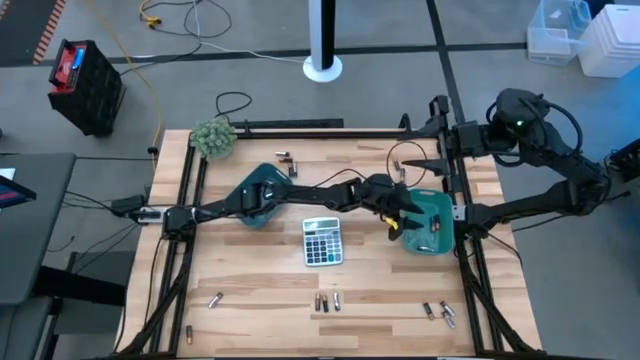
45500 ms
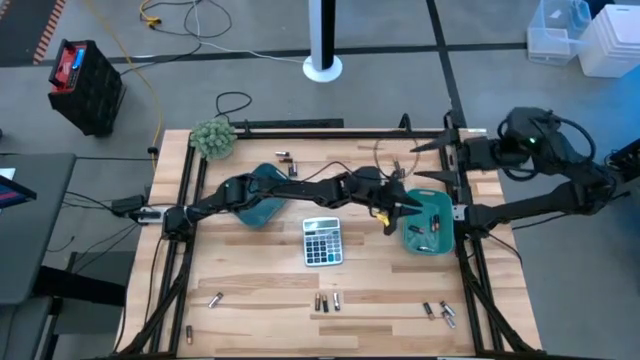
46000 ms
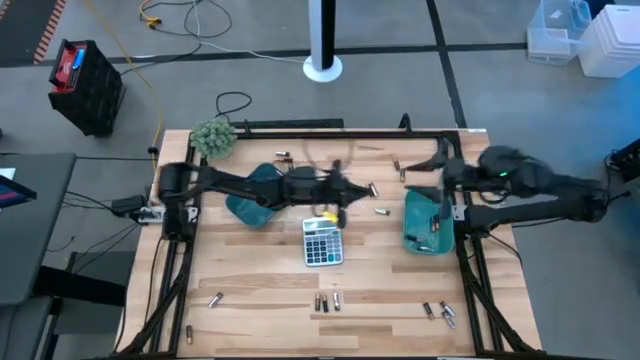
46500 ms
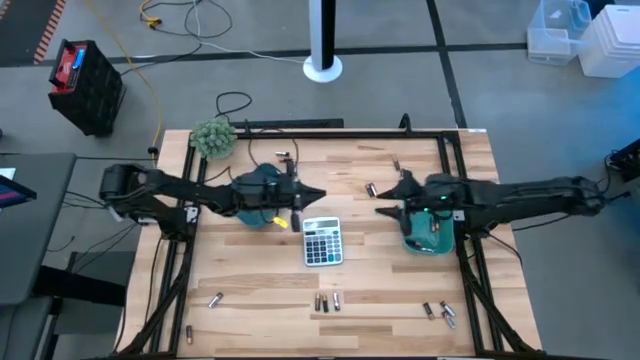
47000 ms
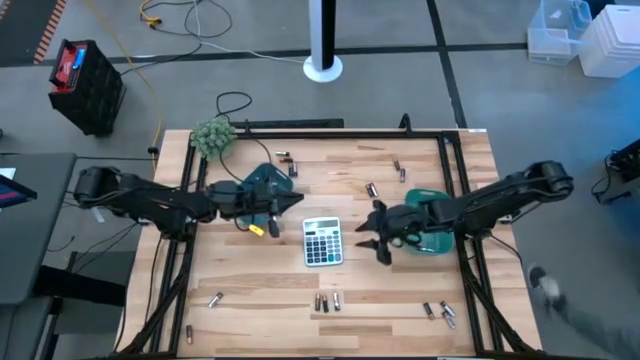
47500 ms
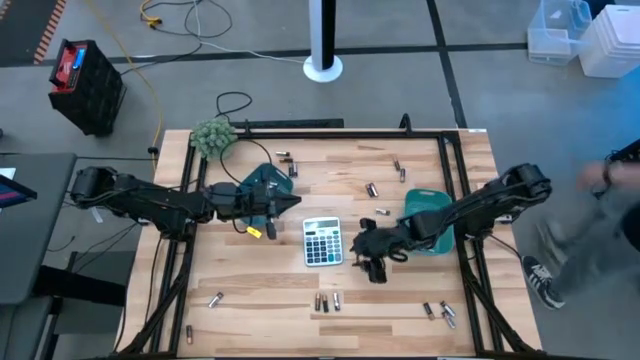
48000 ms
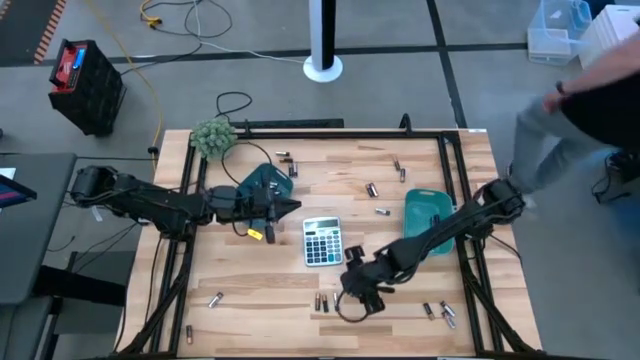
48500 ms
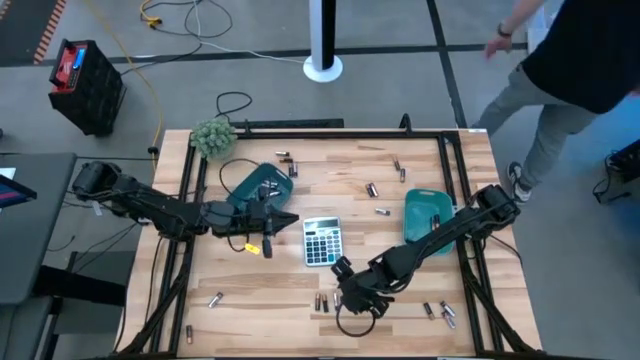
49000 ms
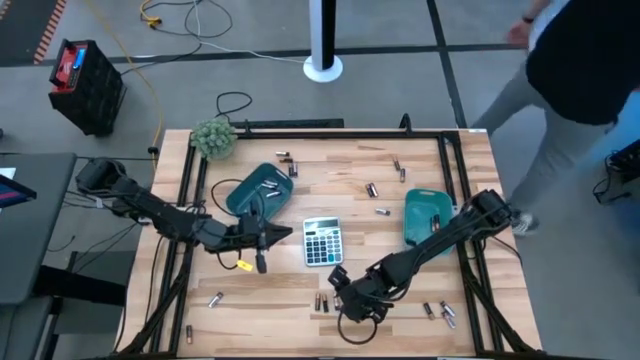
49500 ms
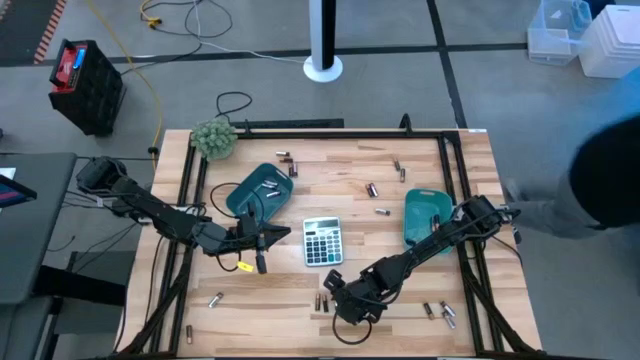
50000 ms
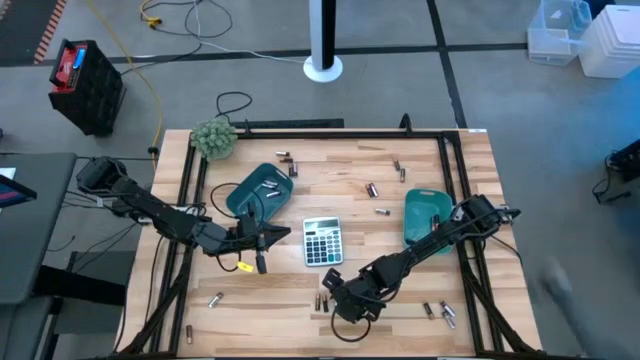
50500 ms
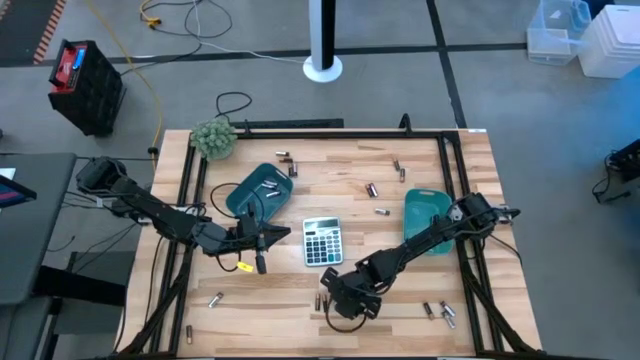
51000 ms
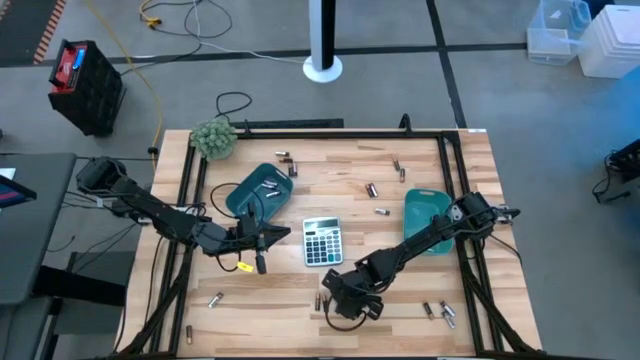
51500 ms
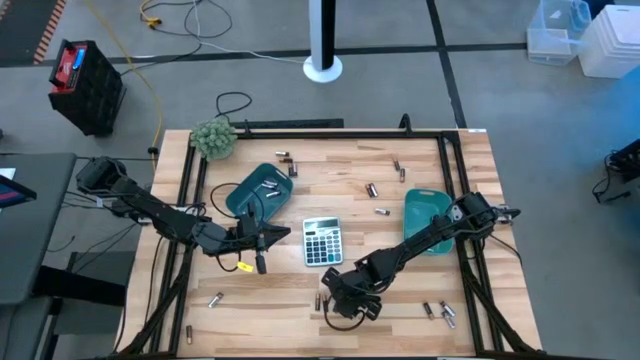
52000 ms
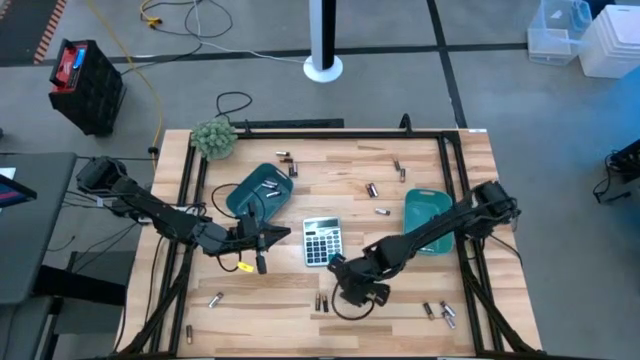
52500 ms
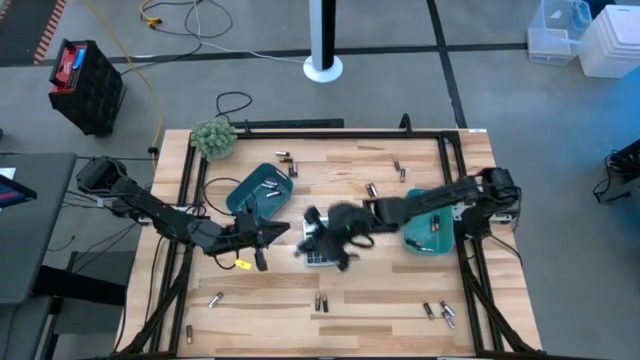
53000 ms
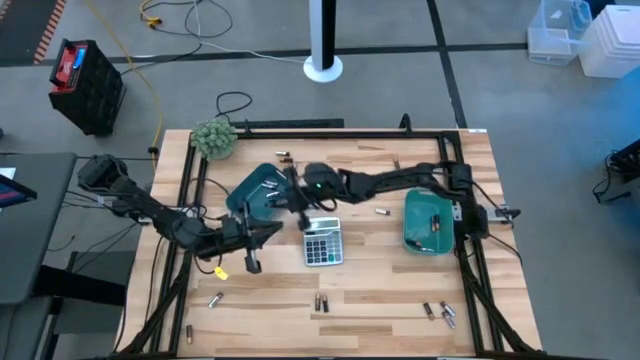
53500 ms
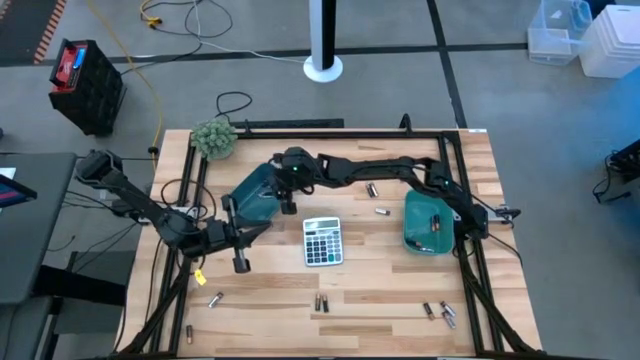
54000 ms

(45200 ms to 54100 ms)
Task: Sort batteries
Put the silver/black battery into the blue bin

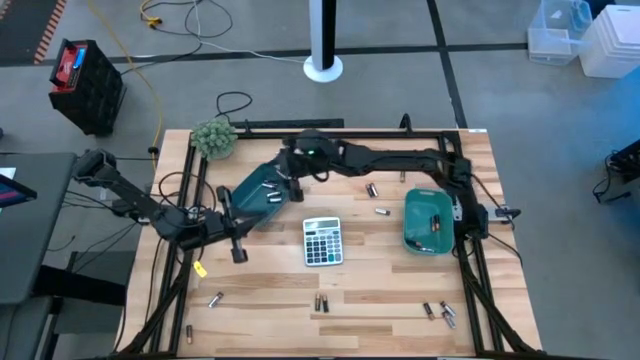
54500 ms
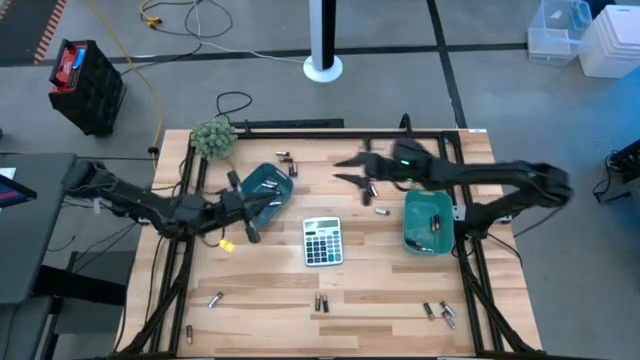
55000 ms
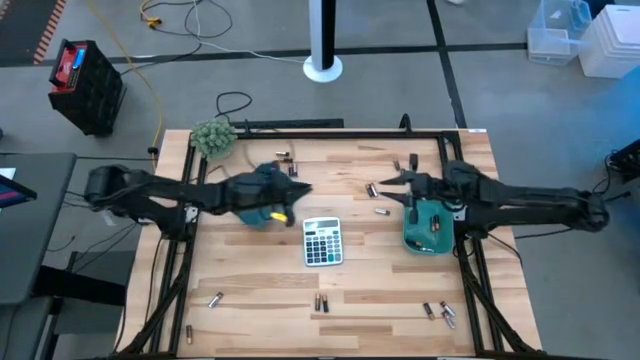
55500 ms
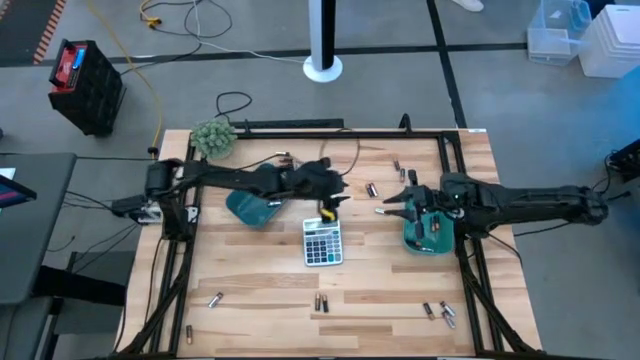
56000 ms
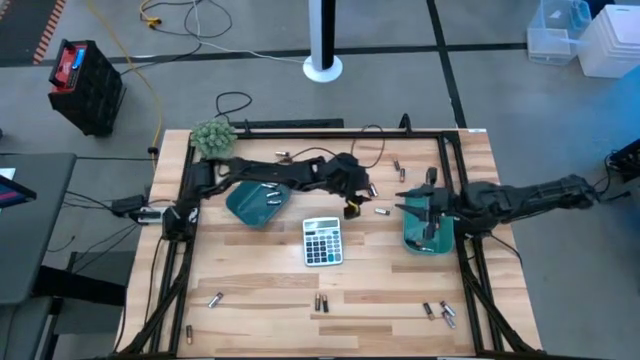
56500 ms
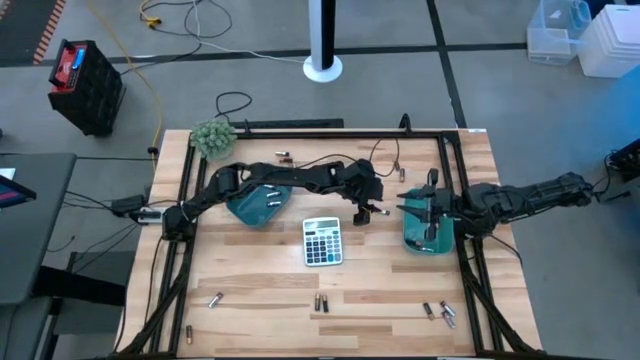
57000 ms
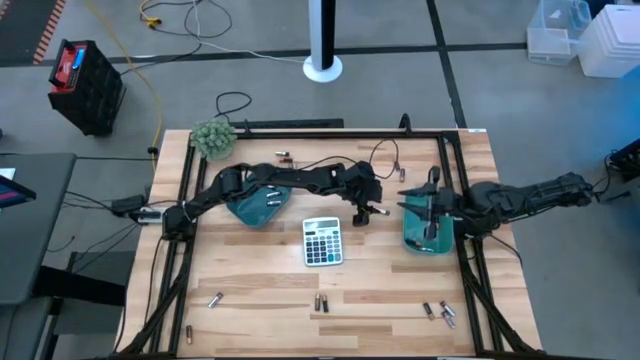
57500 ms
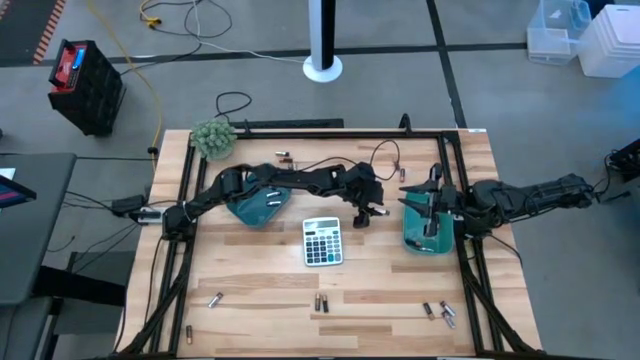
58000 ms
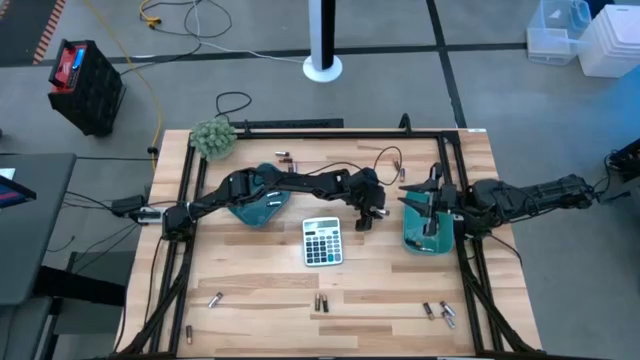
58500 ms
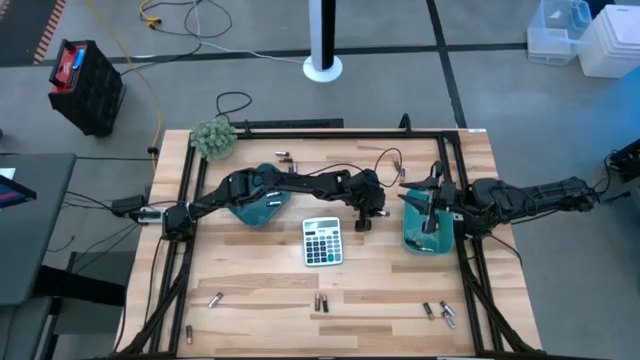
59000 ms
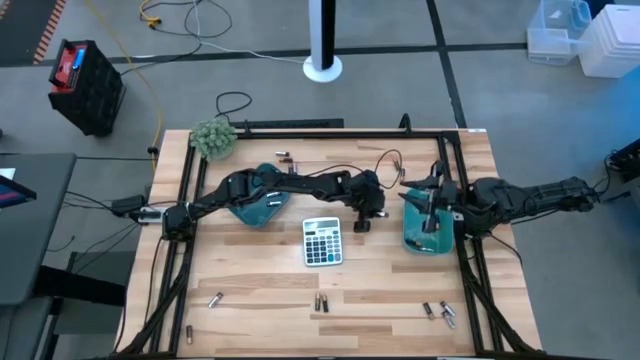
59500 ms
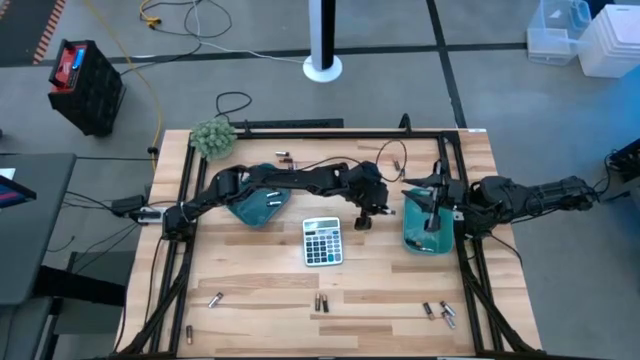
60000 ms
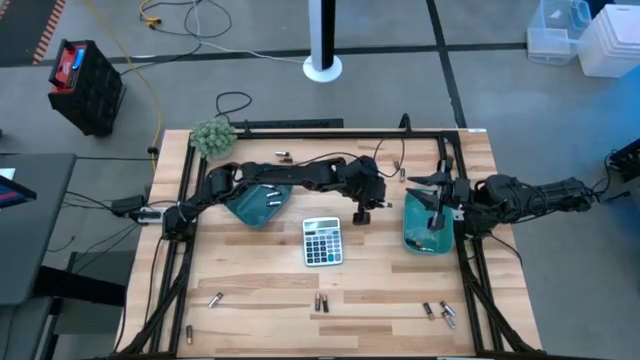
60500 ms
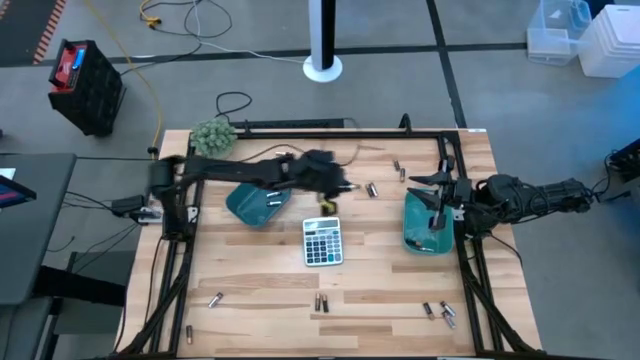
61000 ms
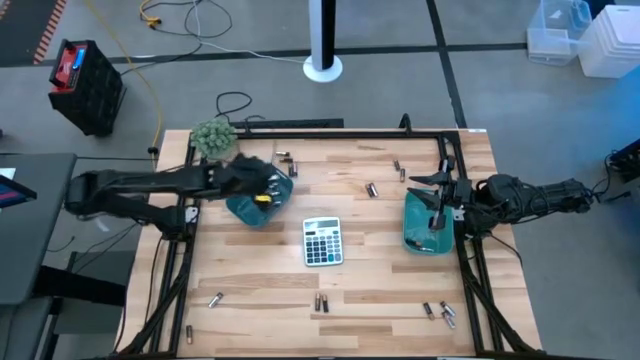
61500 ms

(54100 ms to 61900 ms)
Put the silver/black battery into the blue bin

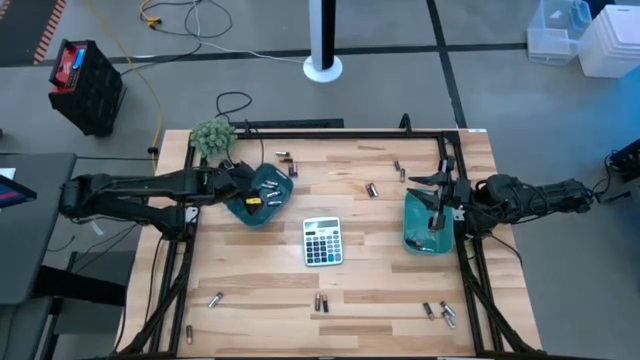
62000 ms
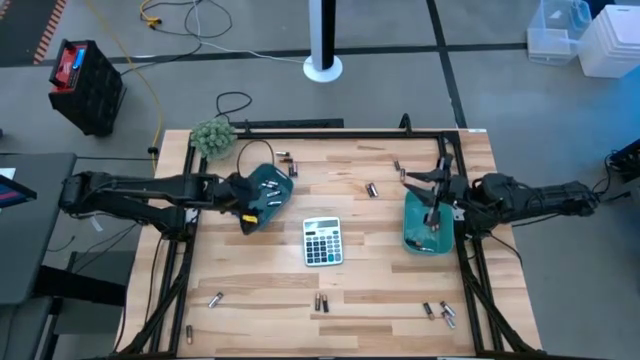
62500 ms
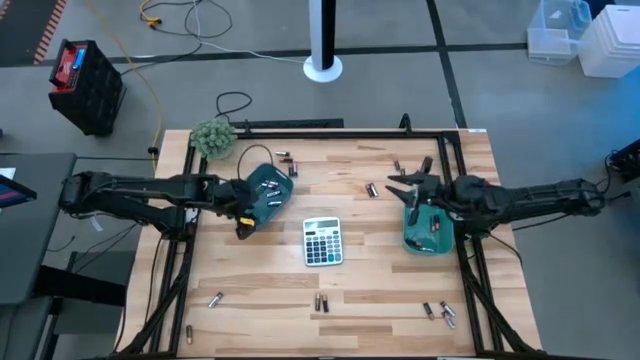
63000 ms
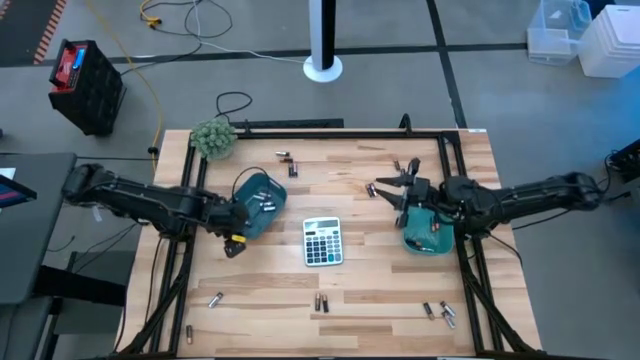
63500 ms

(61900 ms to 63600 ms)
Adjust the blue bin

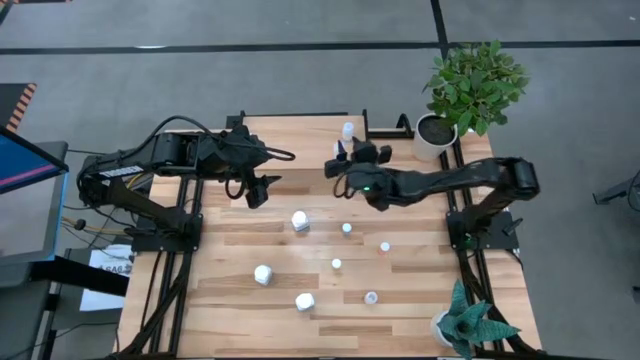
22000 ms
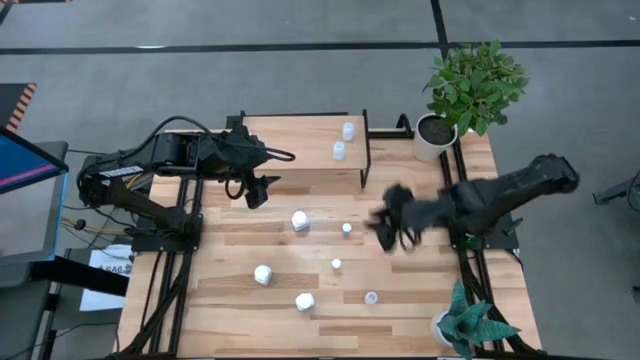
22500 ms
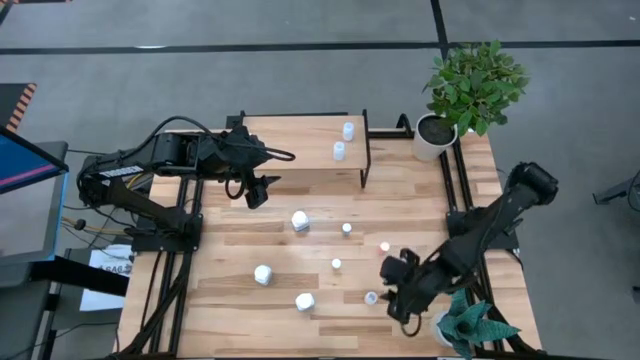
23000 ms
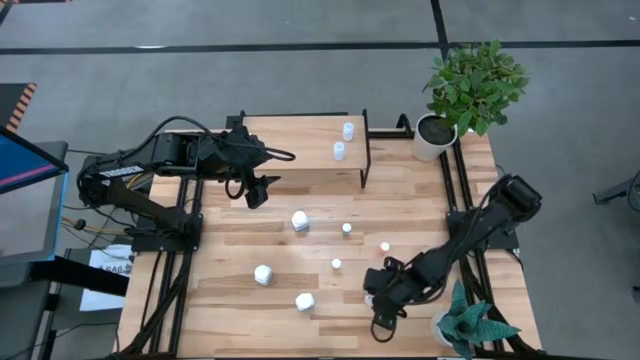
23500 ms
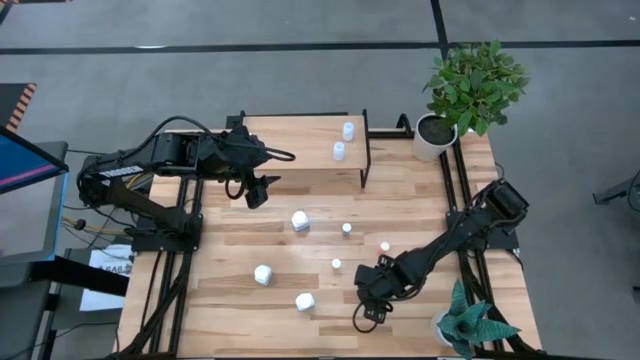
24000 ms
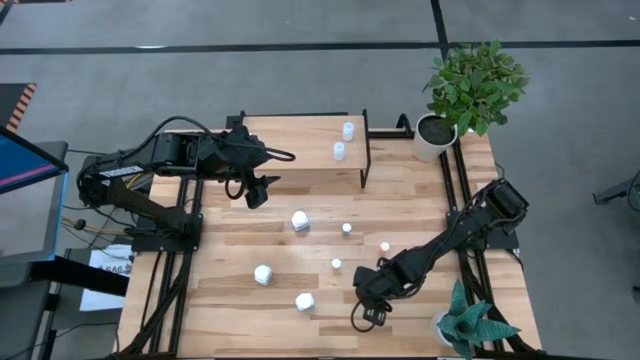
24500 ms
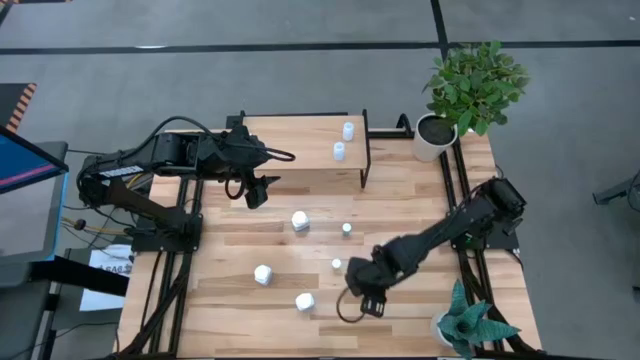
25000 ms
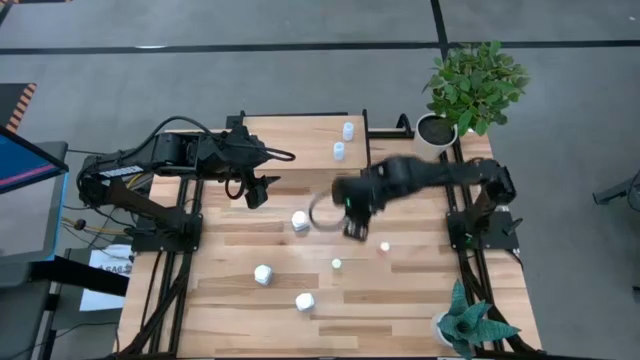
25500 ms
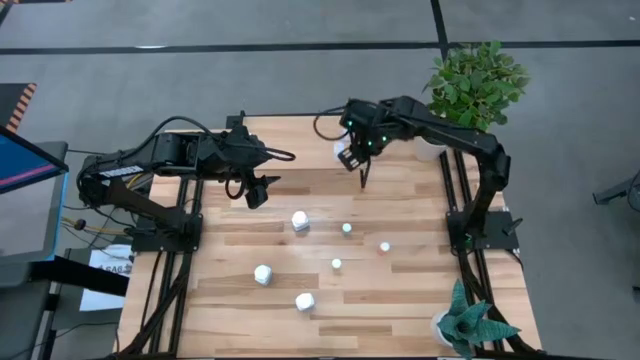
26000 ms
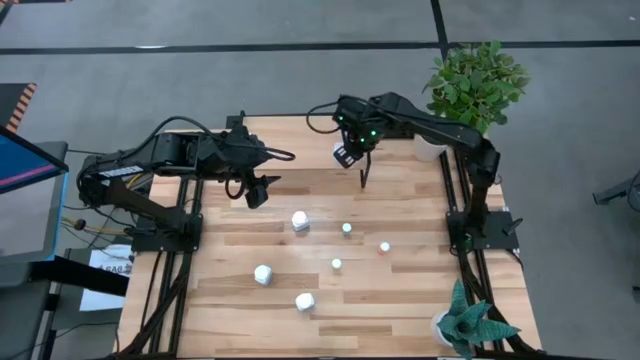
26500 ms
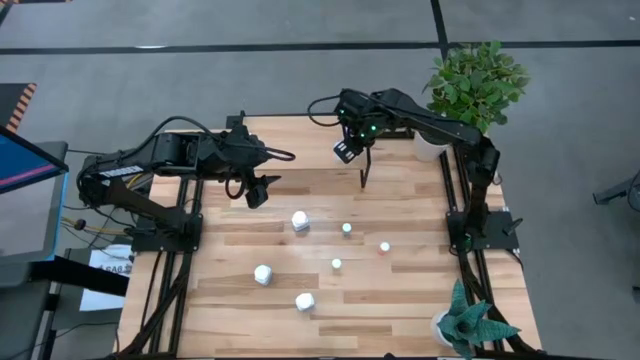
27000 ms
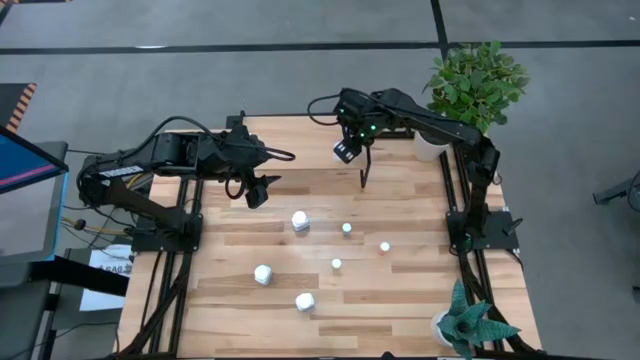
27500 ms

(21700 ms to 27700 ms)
Task: Pick and place medicine bottles onto shelf by color
Put the transparent medicine bottle on the shelf
